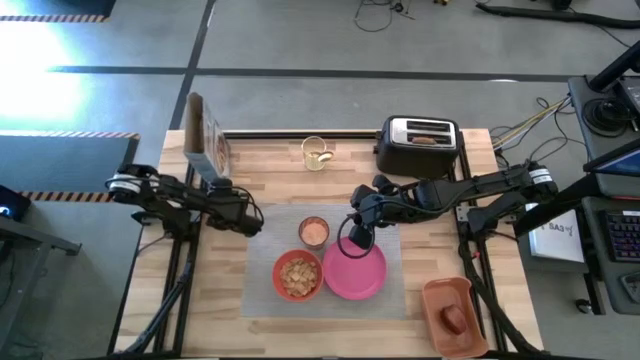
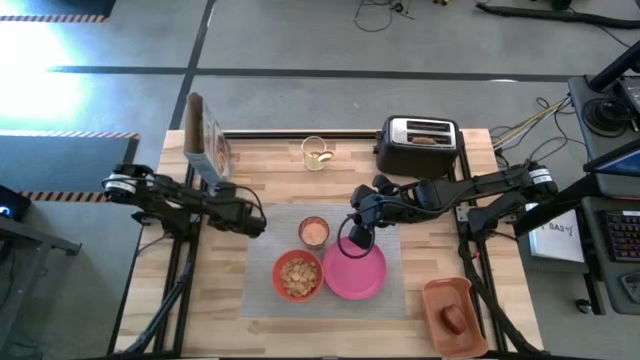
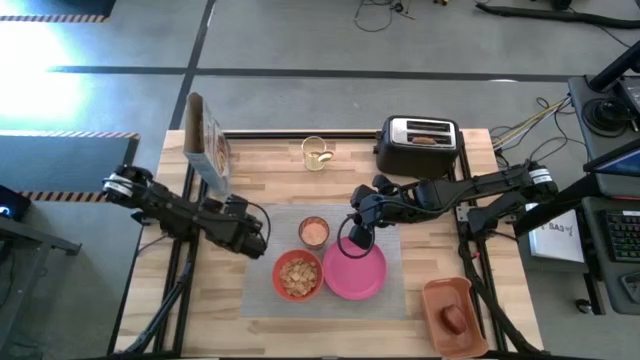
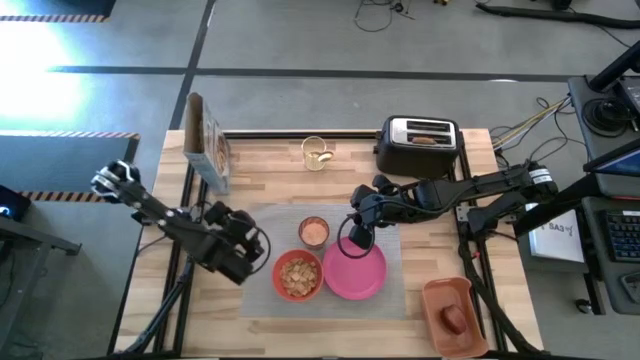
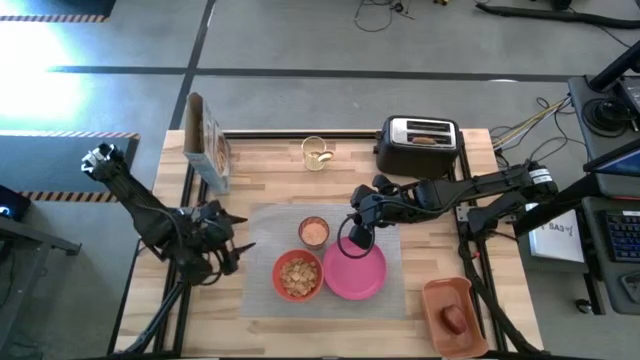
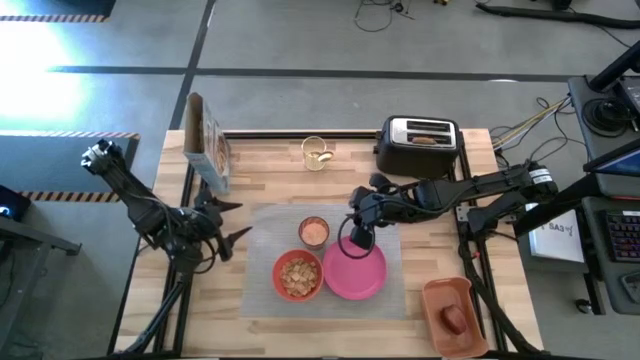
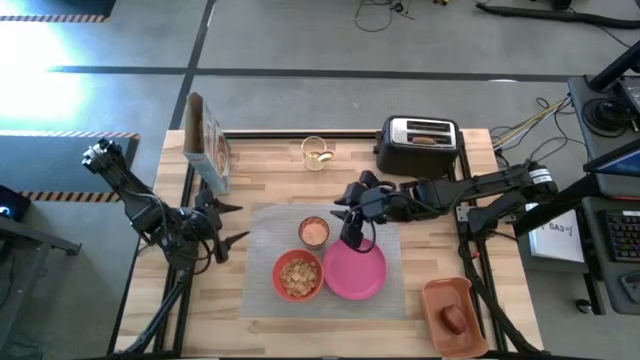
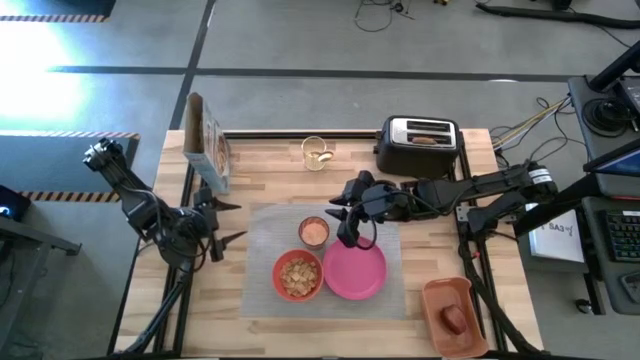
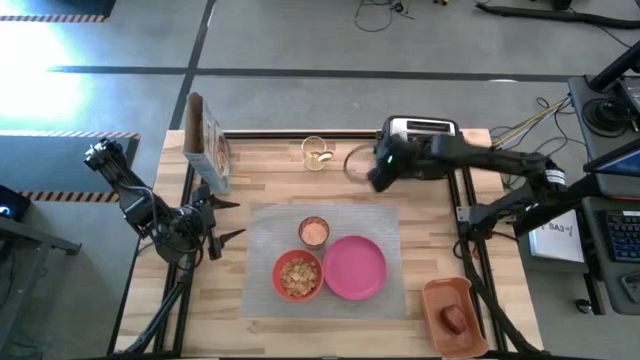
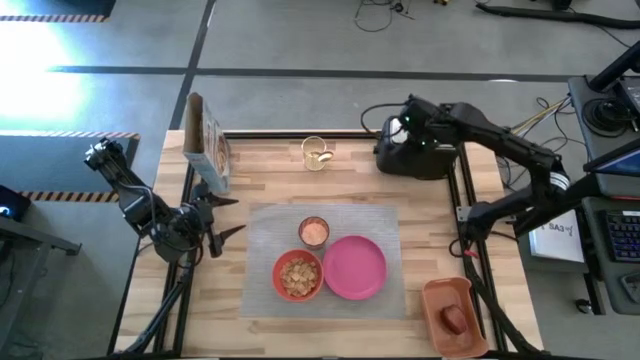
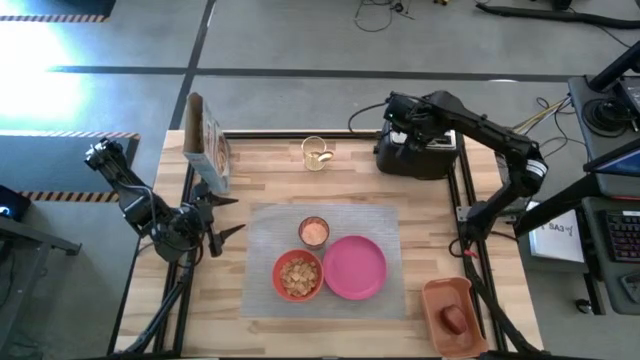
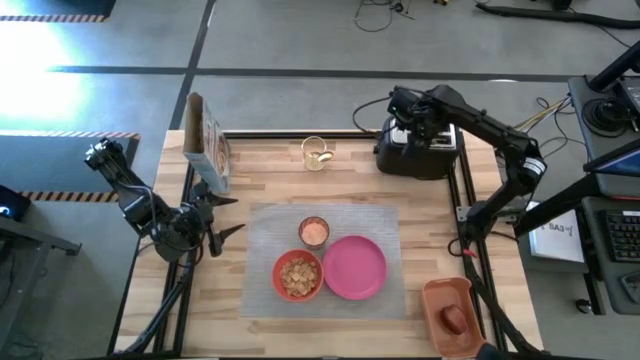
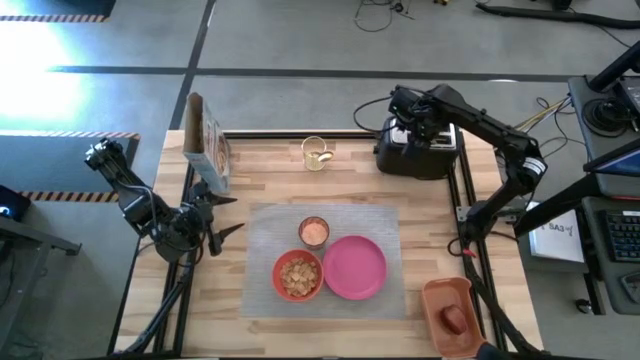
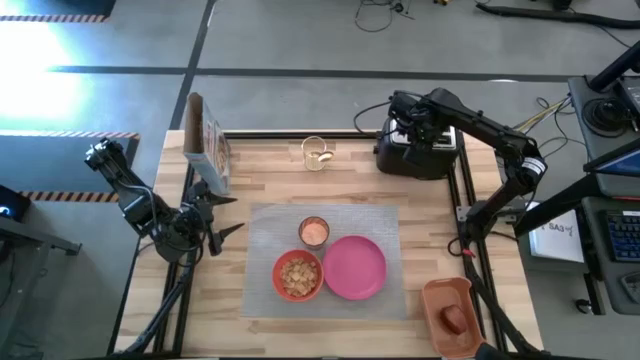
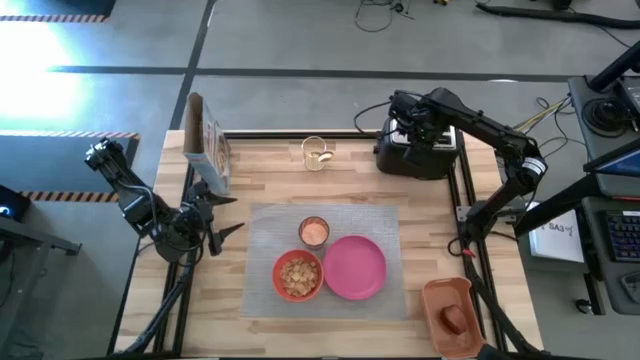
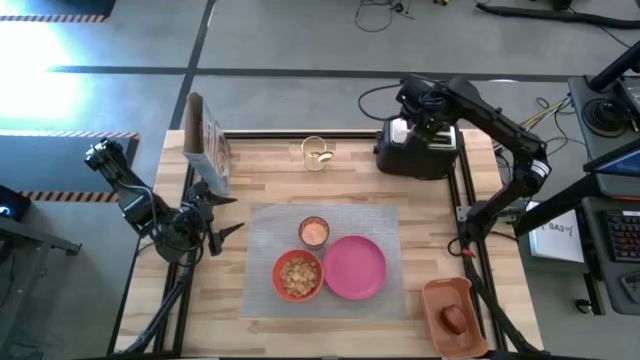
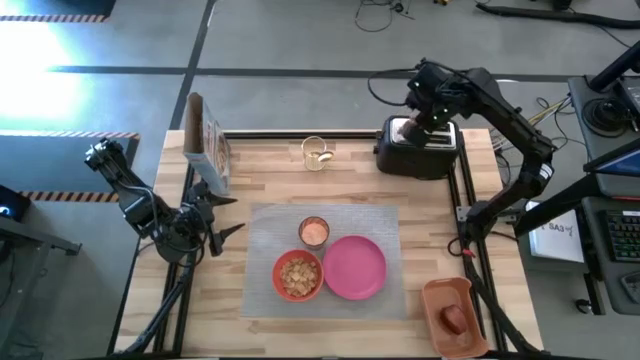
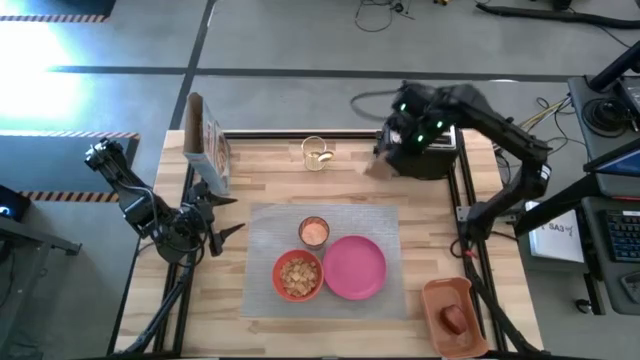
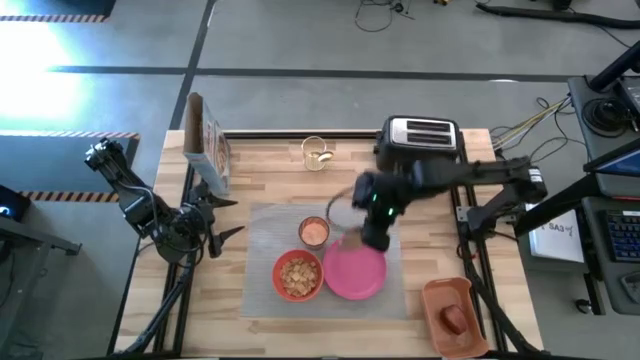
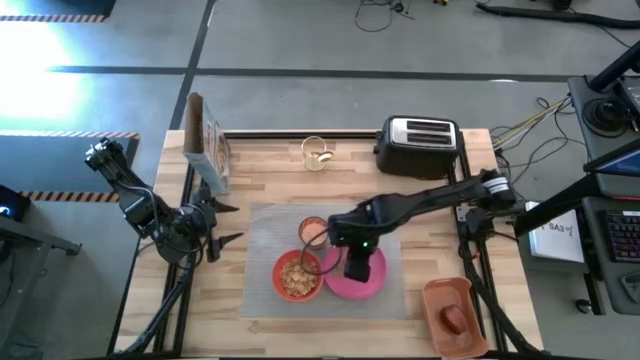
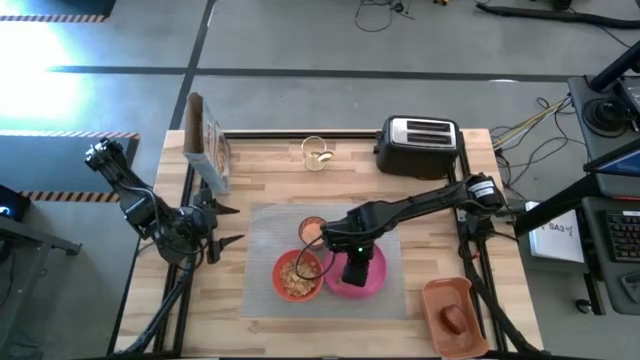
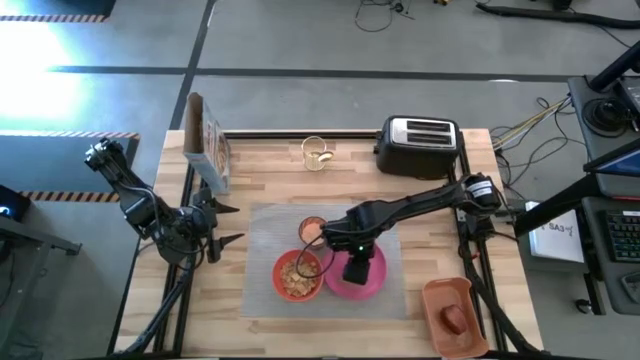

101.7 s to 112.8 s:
Task: Arrange a breakfast setting
Put the brown toasted bread on the pink plate

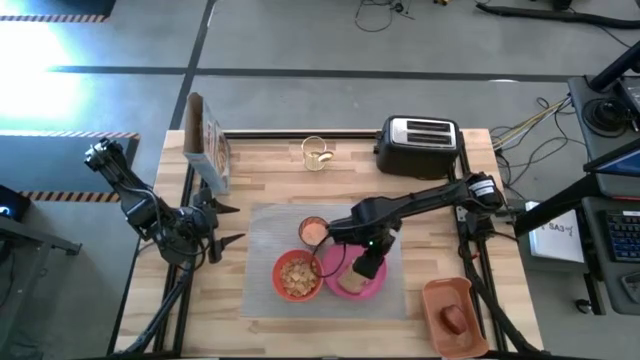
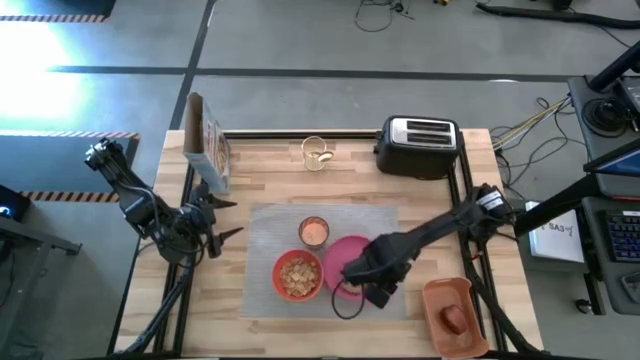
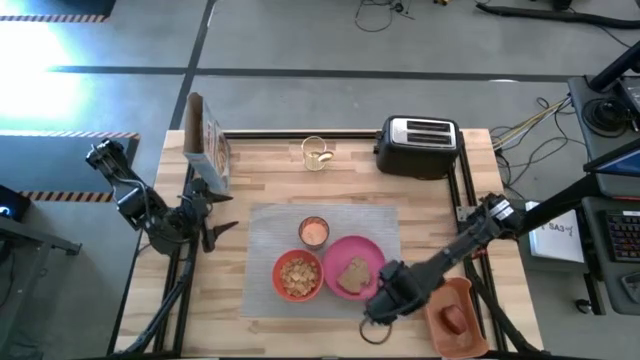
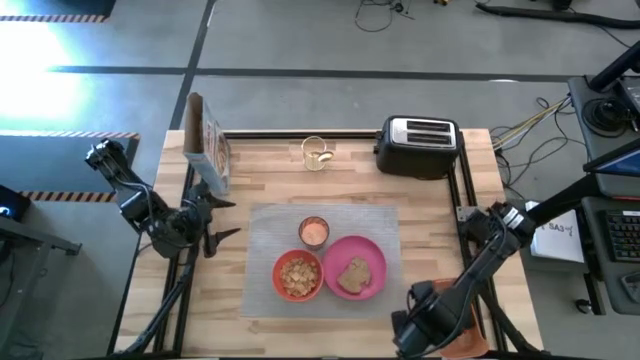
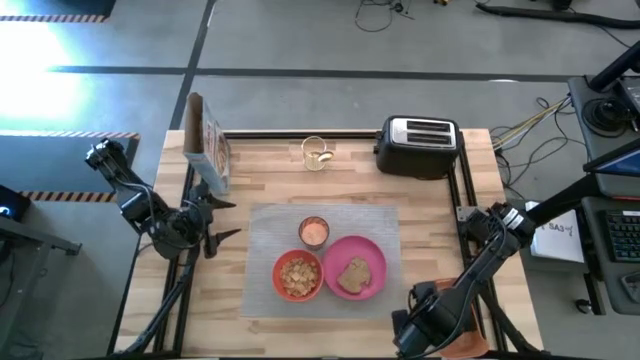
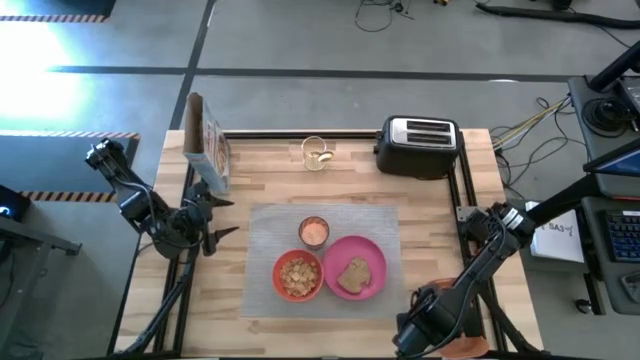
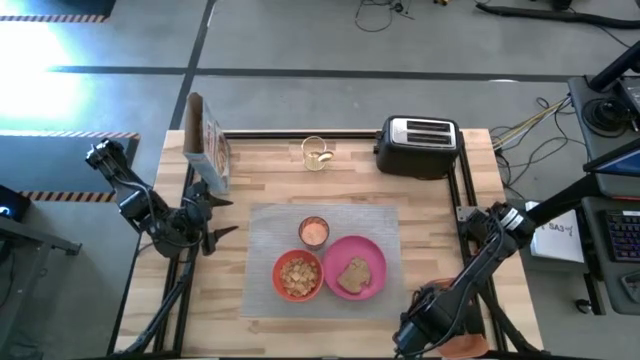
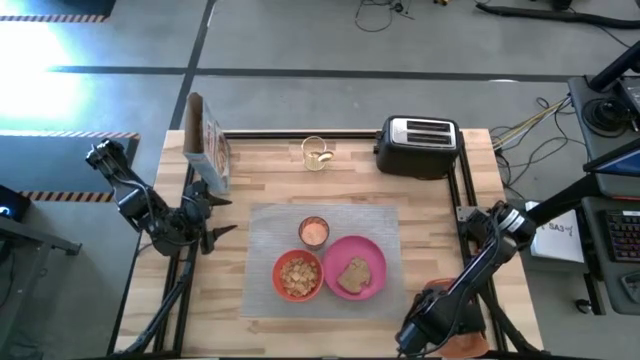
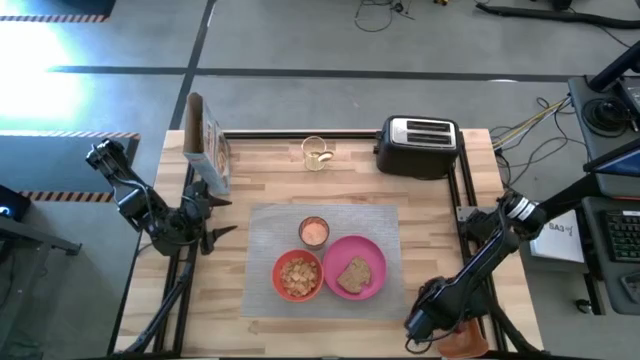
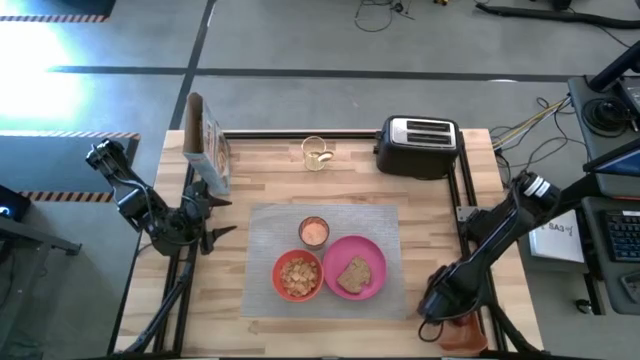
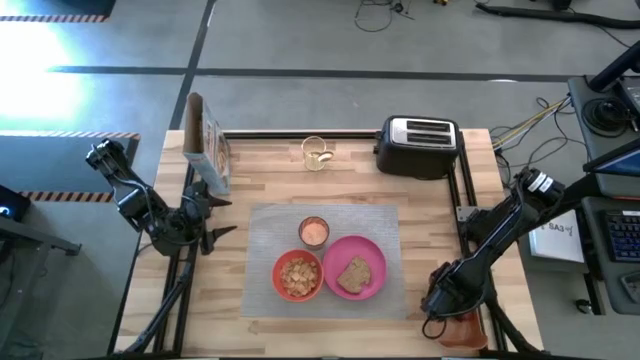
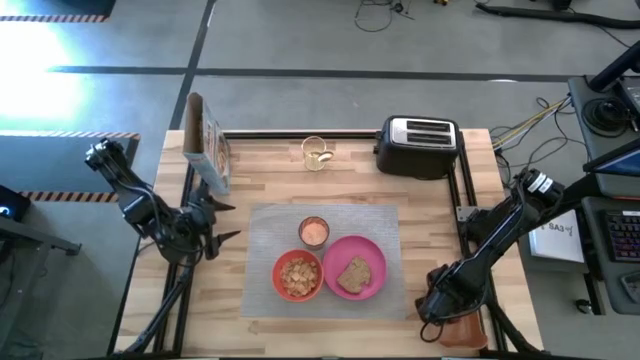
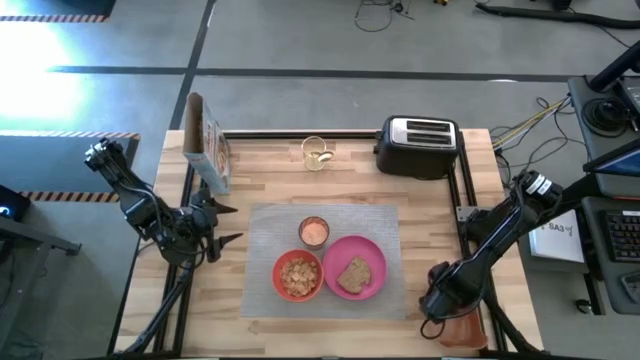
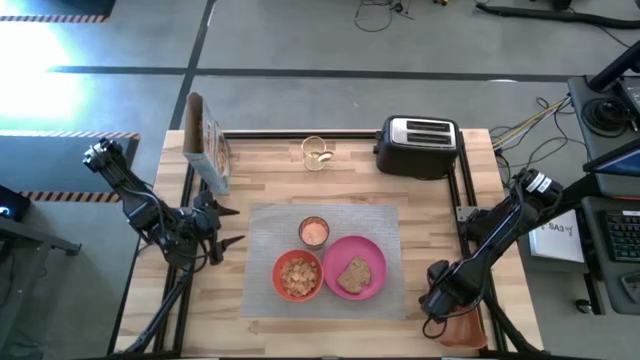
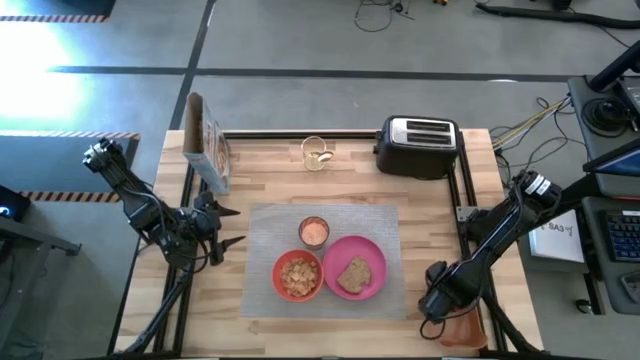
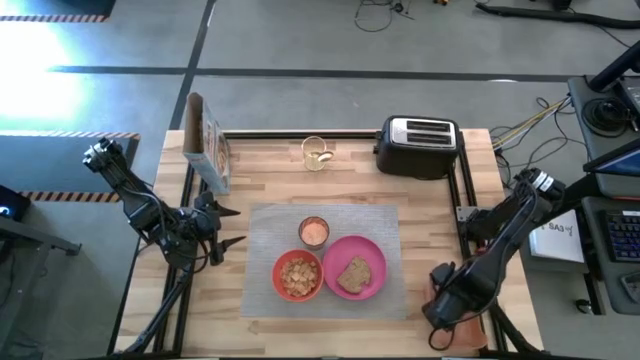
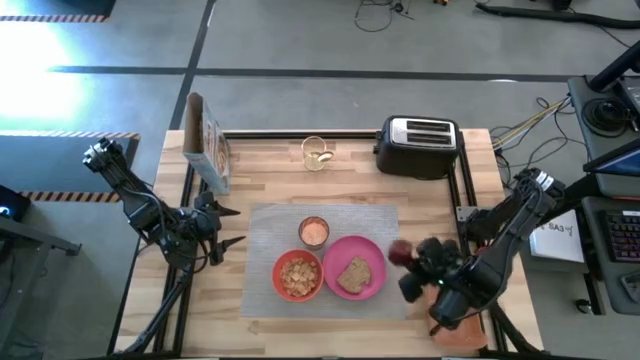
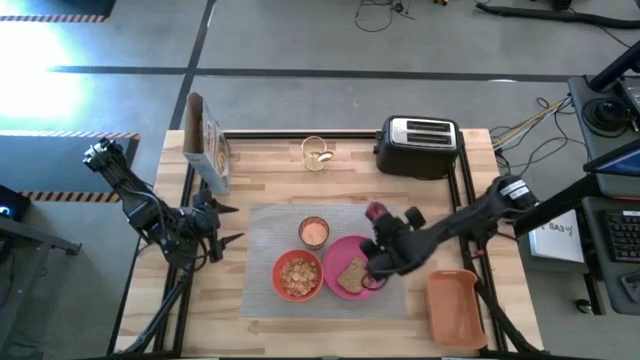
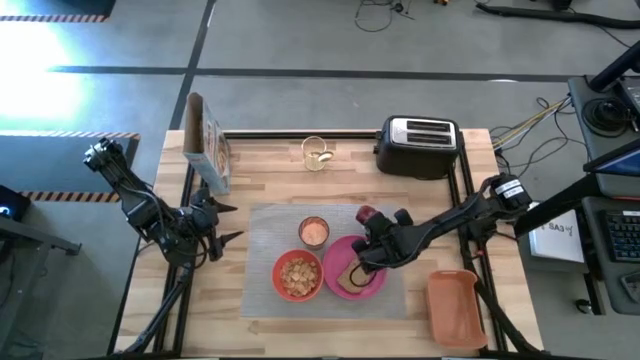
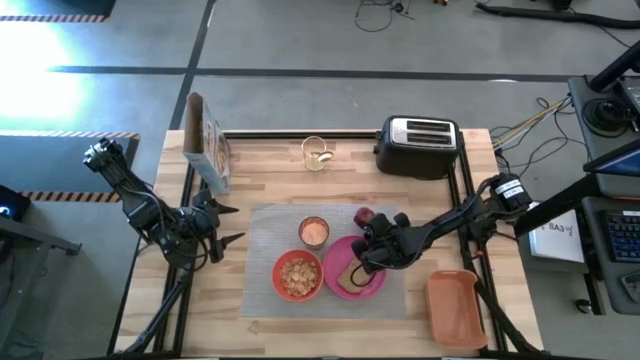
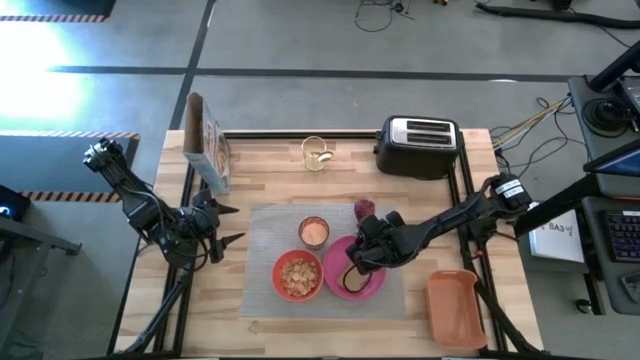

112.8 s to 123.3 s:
Put the red apple to the top of the pink plate on the gray mat
